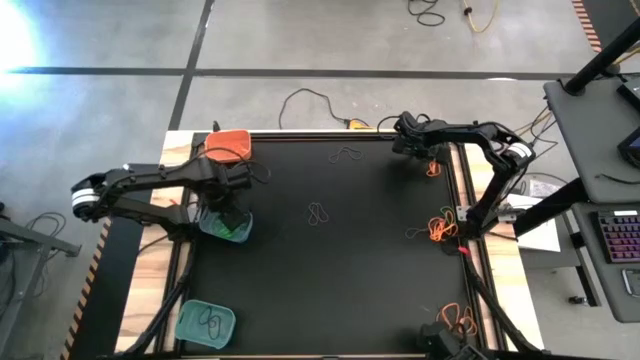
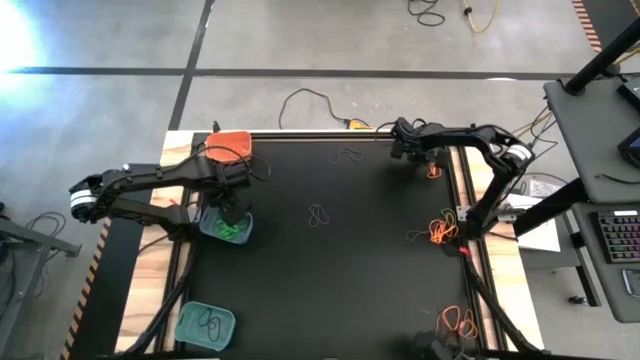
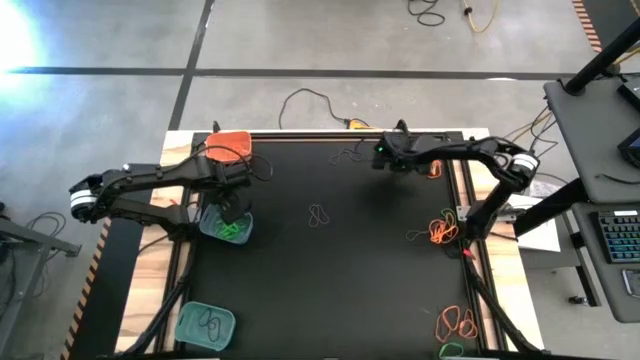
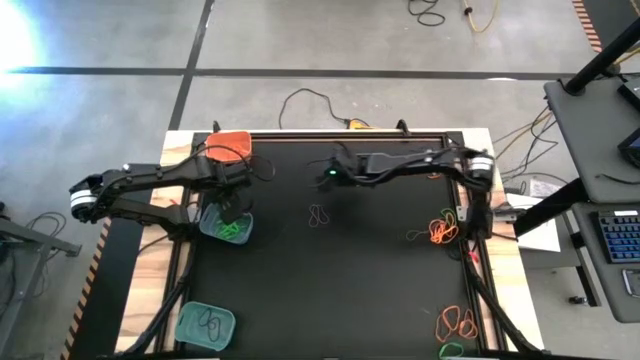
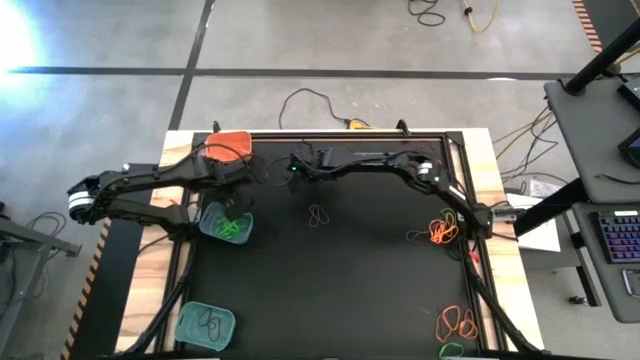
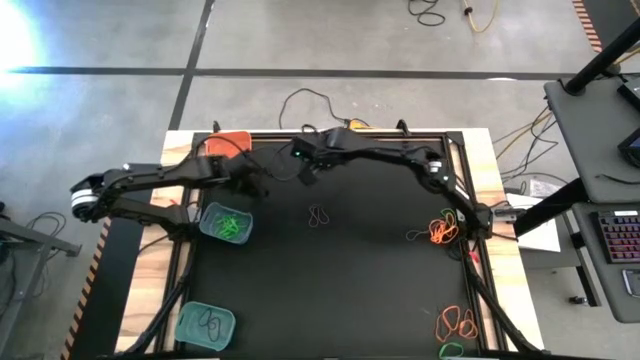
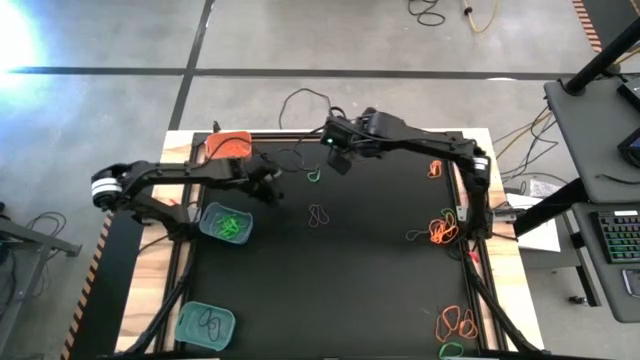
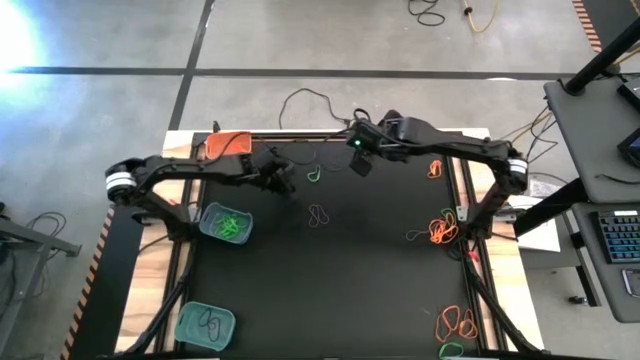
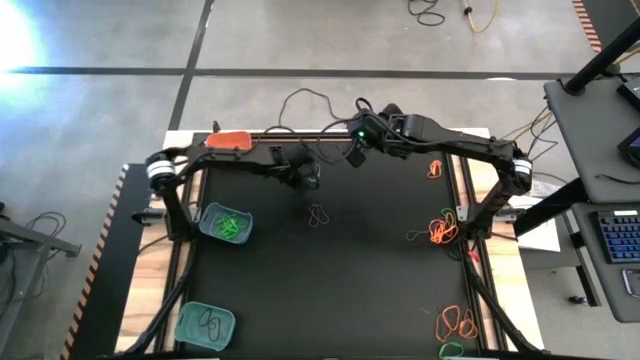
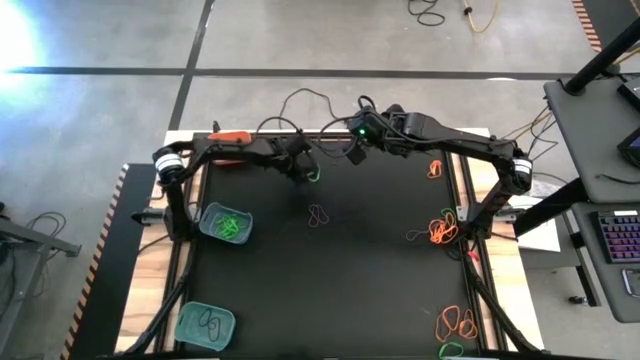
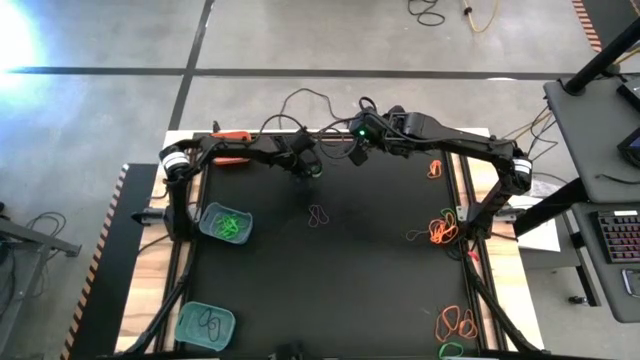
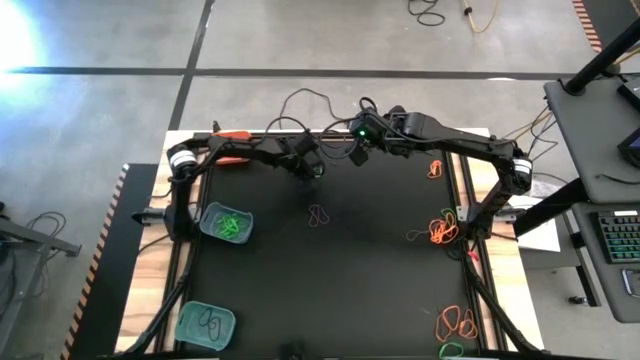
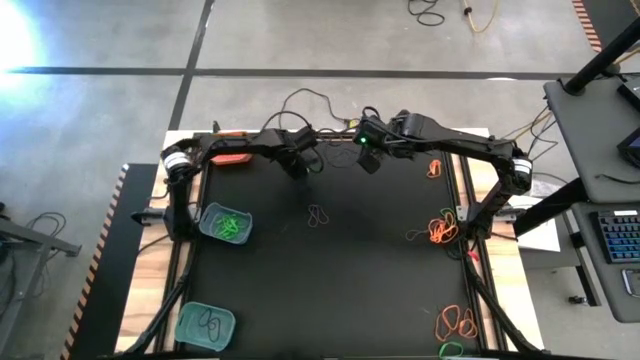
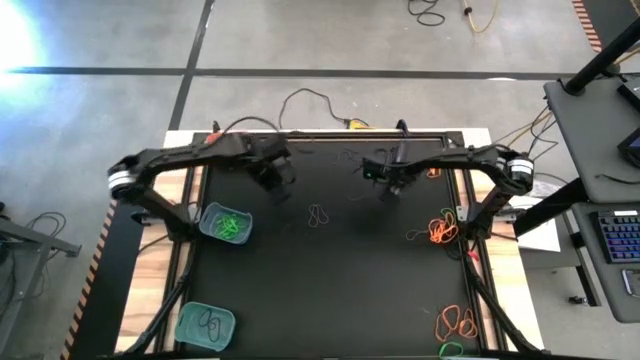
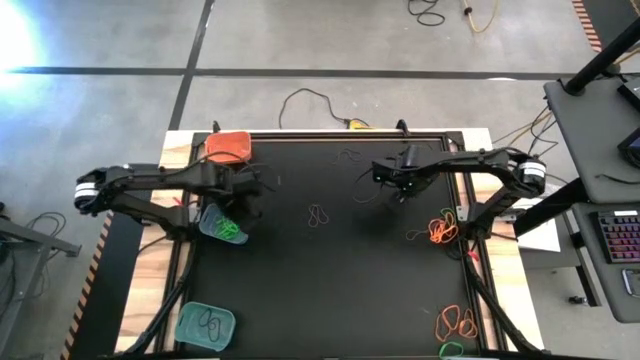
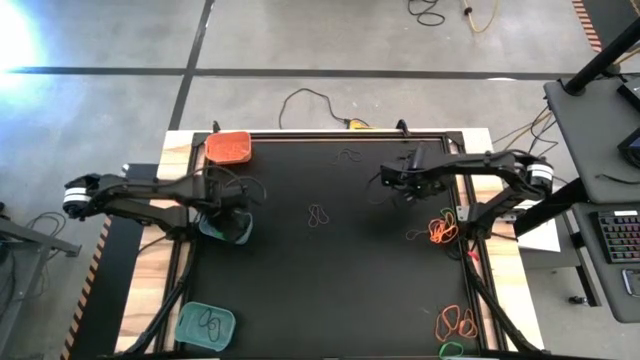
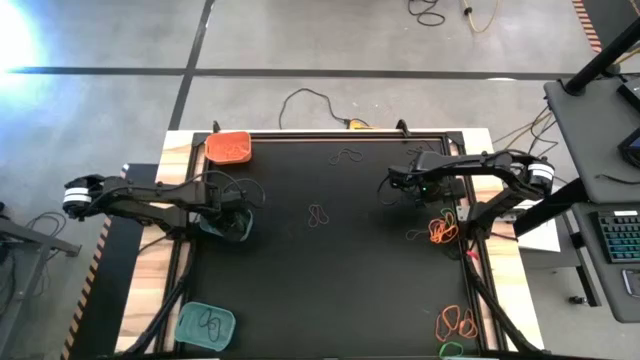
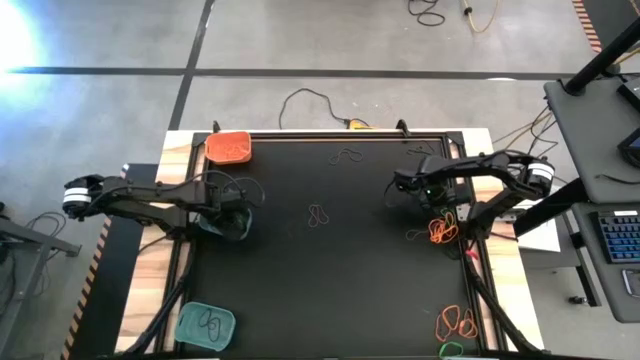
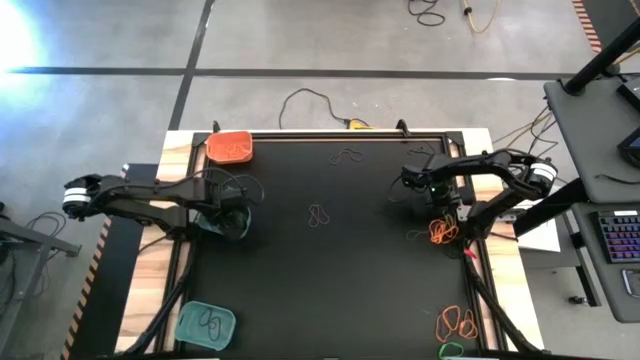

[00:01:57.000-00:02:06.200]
Task: Sort rubber bands into baskets
Put the green rubber band into the blue bin

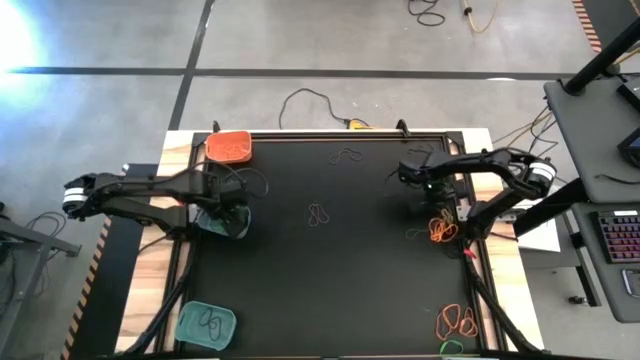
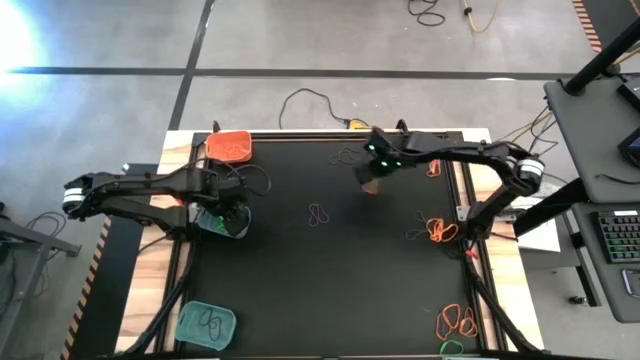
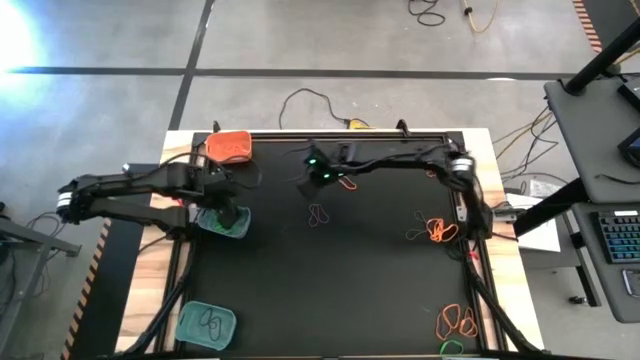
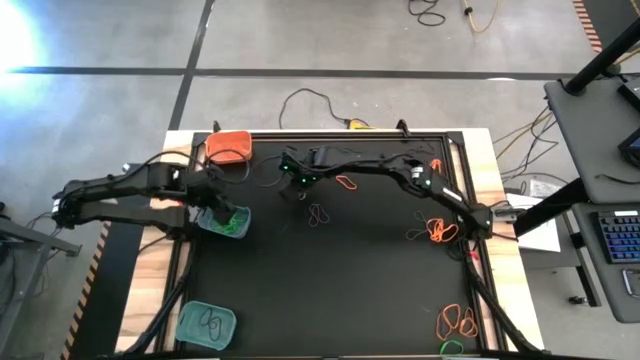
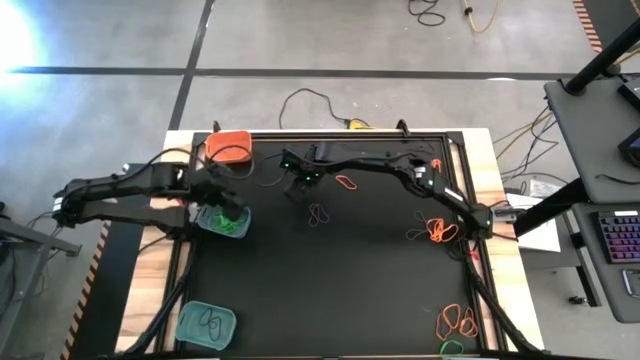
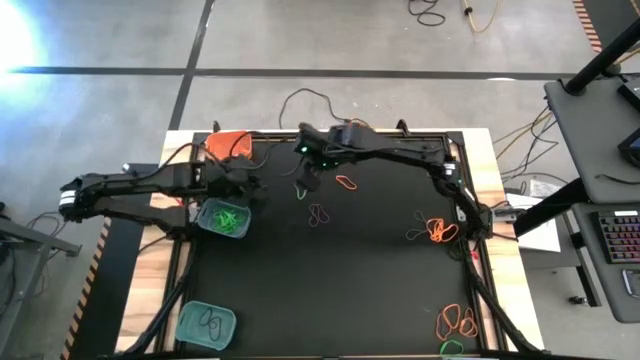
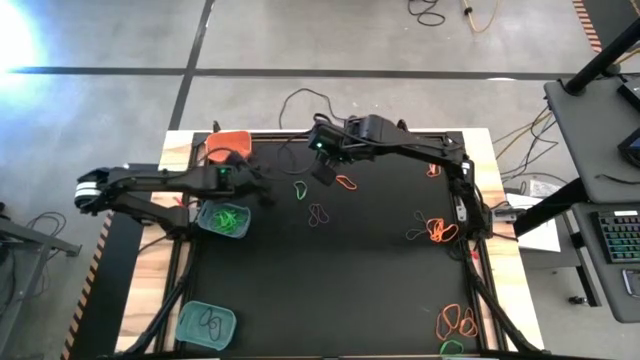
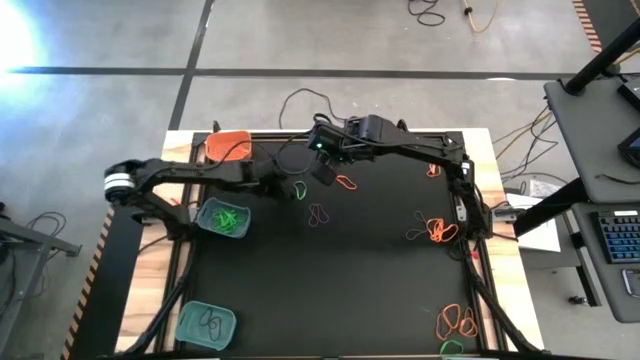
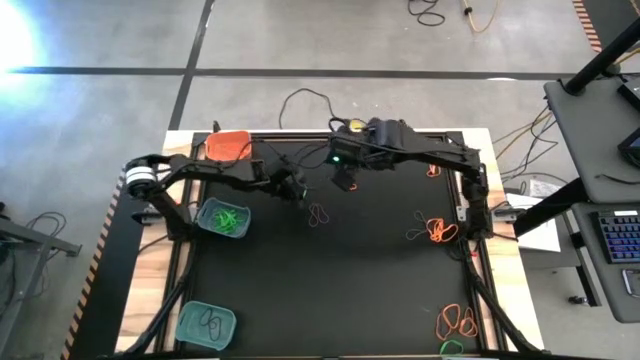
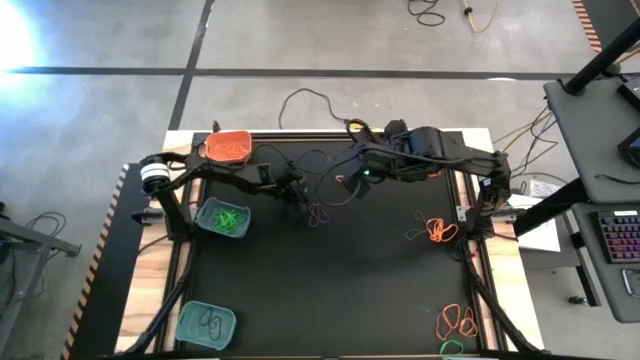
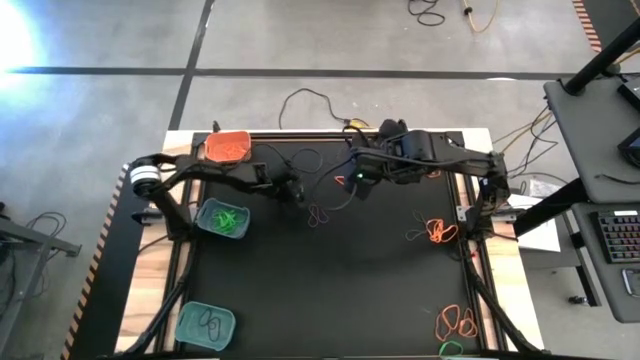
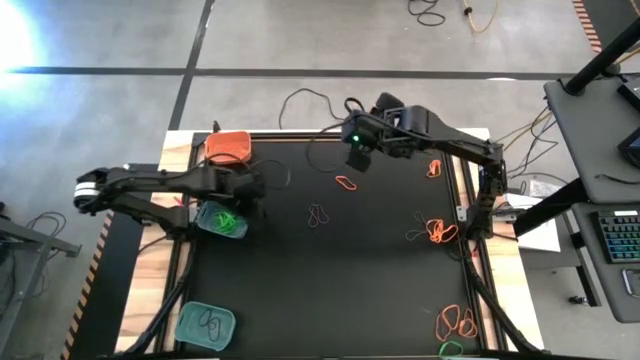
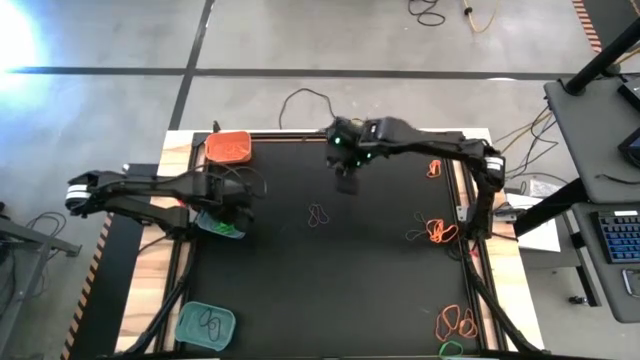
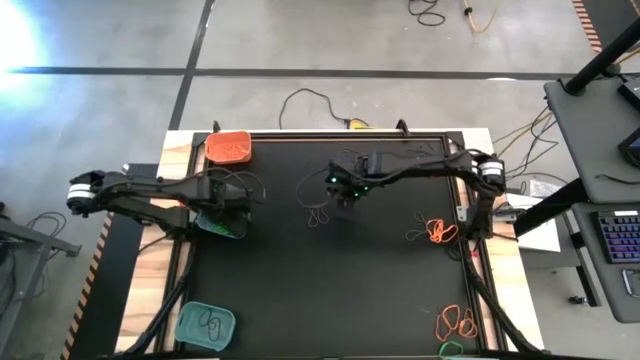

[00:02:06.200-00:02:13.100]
Put the green rubber band into the blue bin

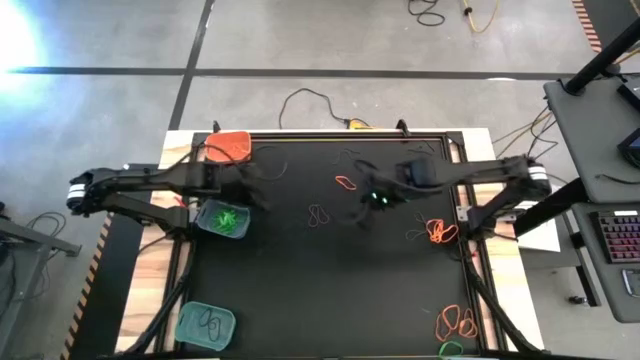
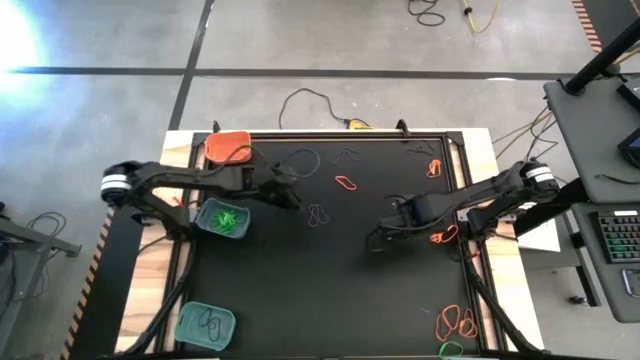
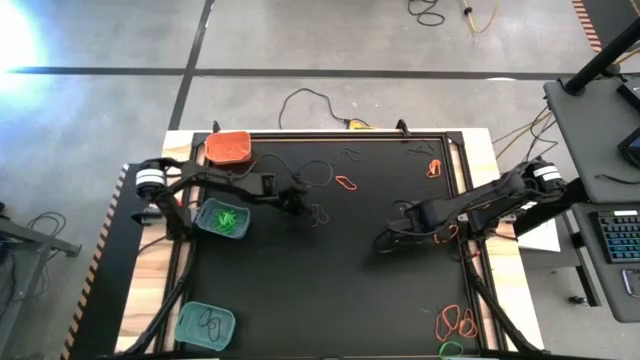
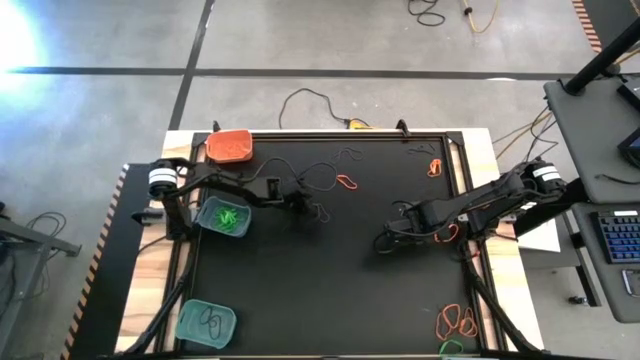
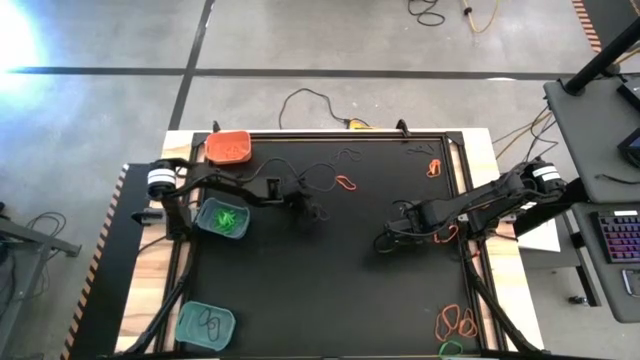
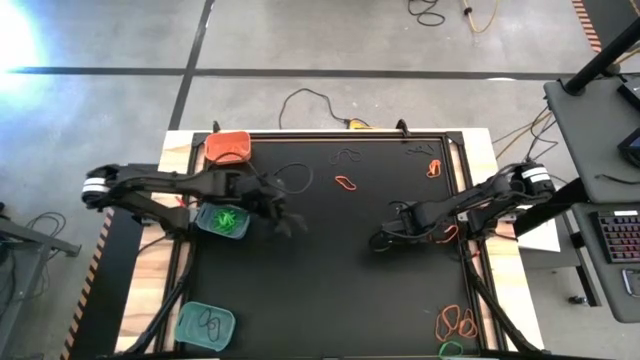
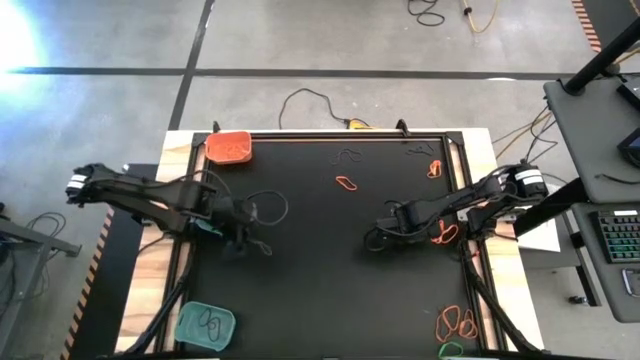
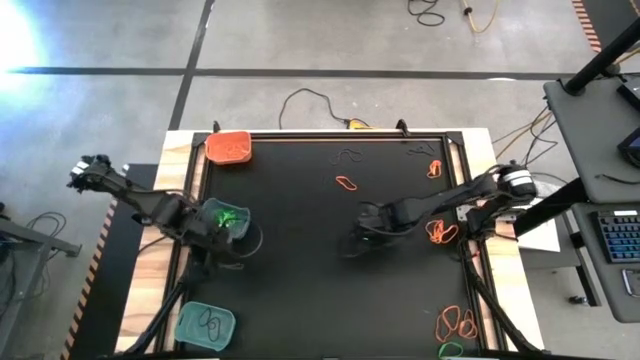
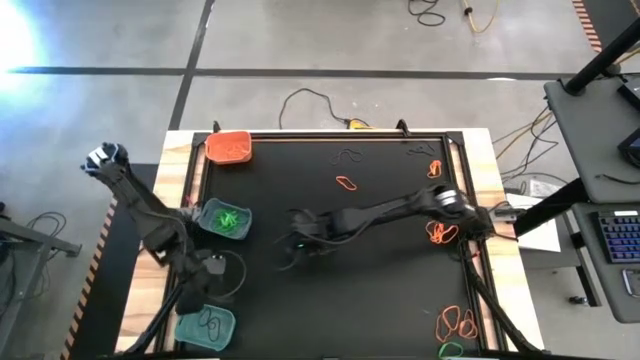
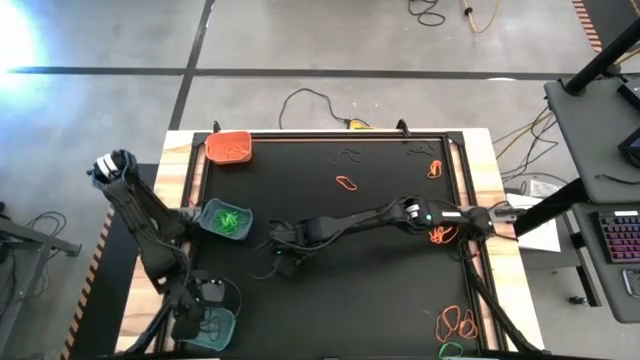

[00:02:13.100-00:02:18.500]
Put the purple rubber band into the green bin
